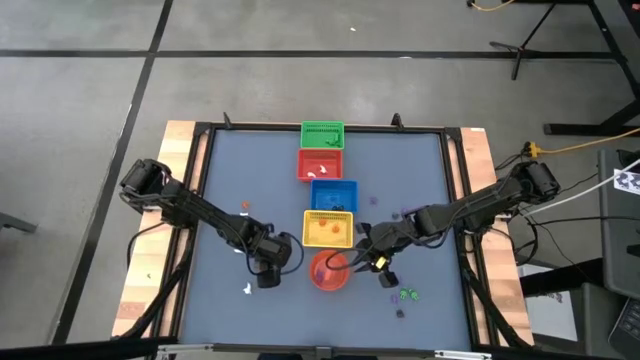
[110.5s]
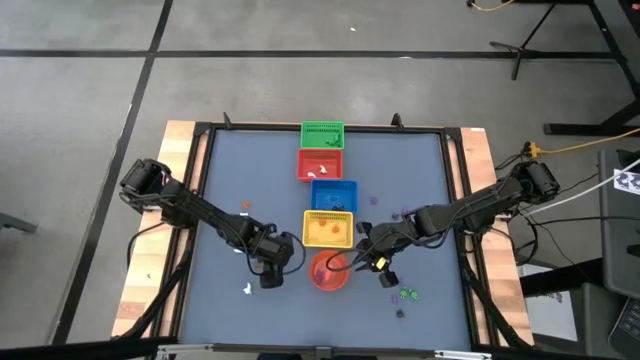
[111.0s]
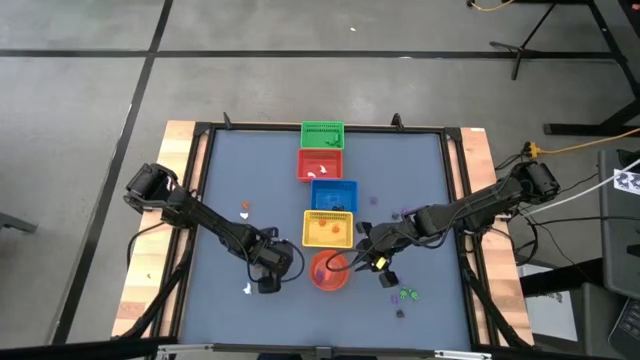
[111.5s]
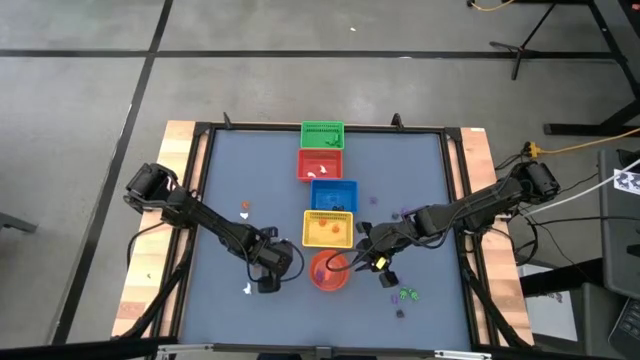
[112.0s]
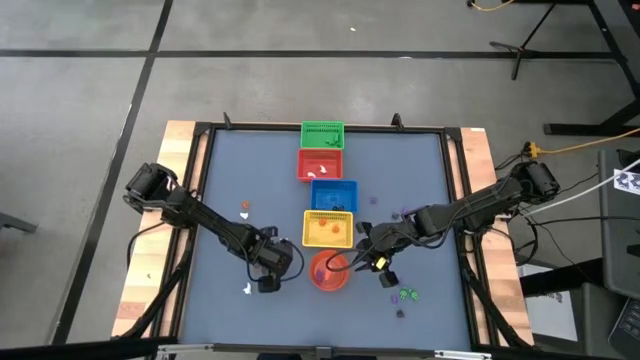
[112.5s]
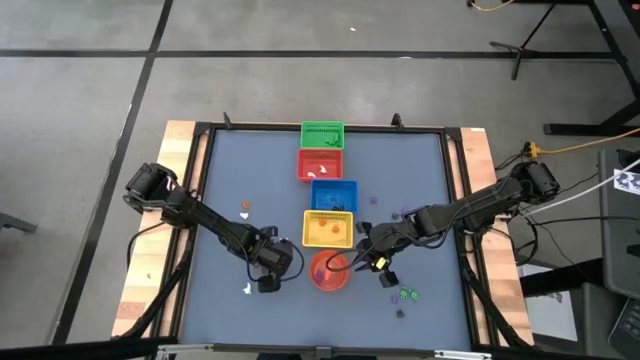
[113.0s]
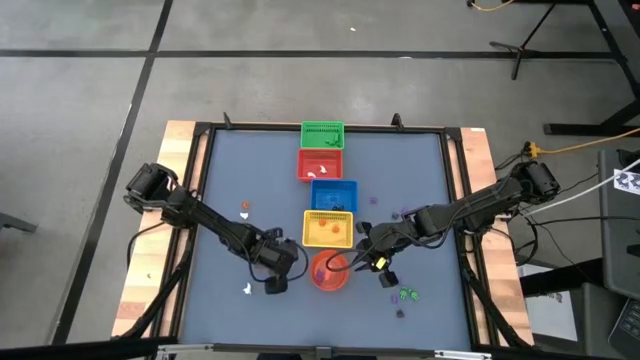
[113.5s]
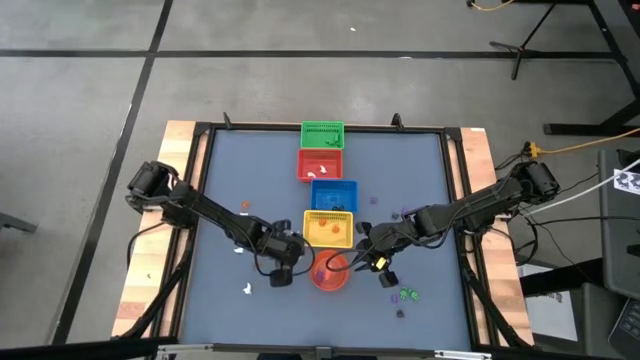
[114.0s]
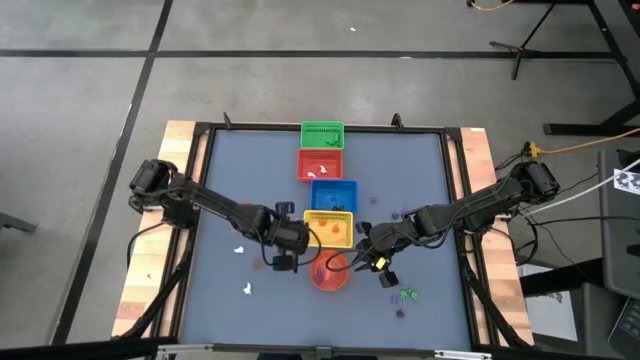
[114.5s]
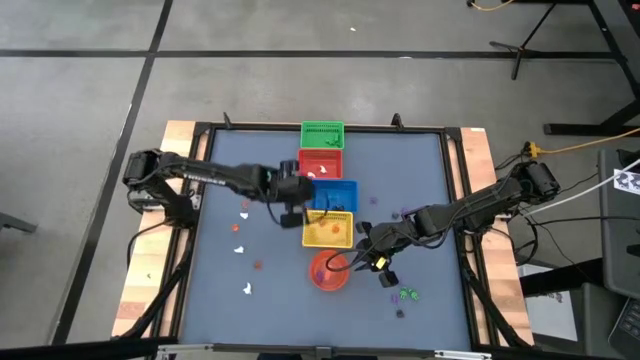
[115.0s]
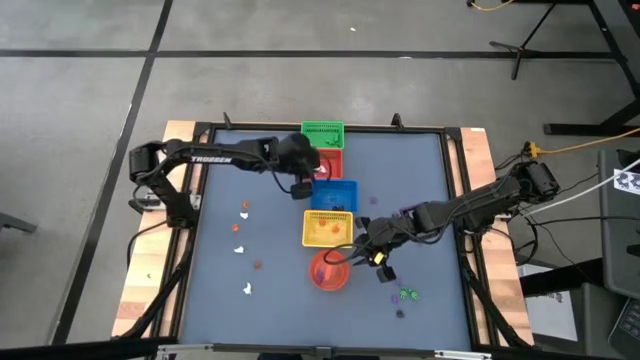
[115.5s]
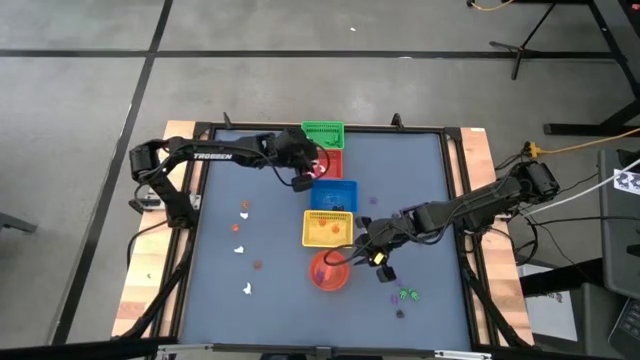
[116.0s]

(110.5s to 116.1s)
Task: Sort Halloween decoration
Put the white ghost toy into the red bin

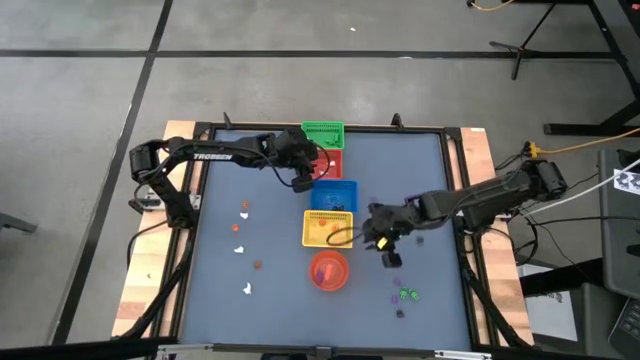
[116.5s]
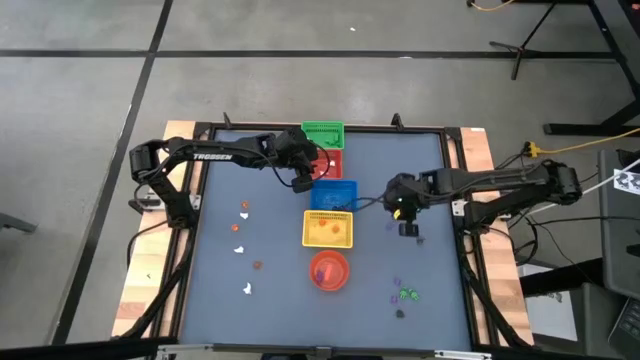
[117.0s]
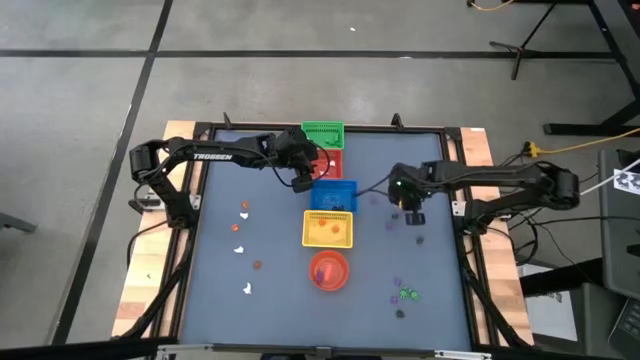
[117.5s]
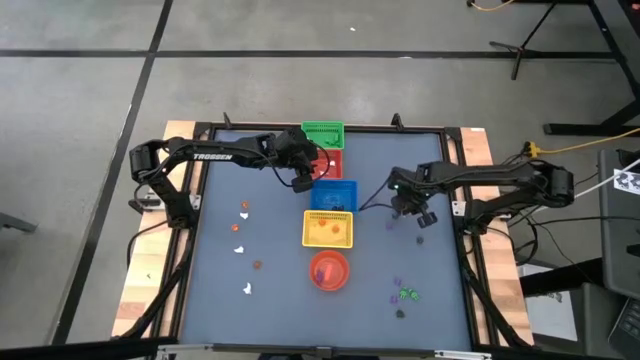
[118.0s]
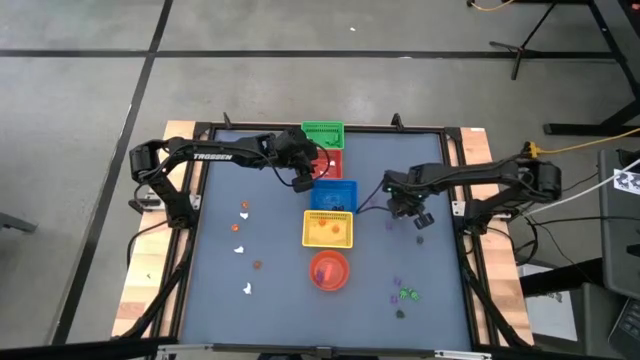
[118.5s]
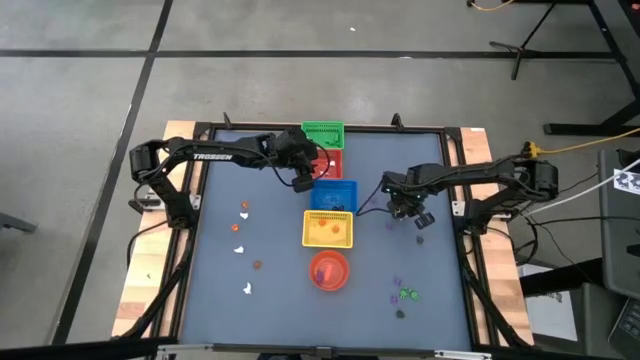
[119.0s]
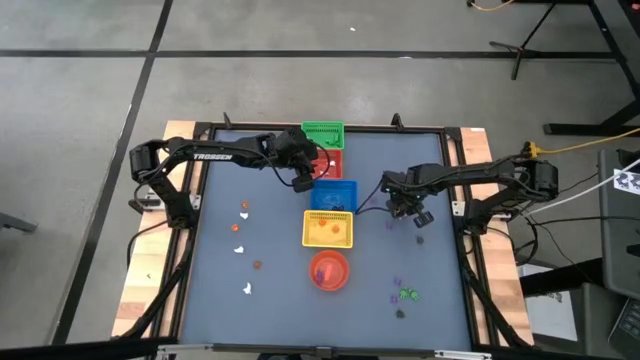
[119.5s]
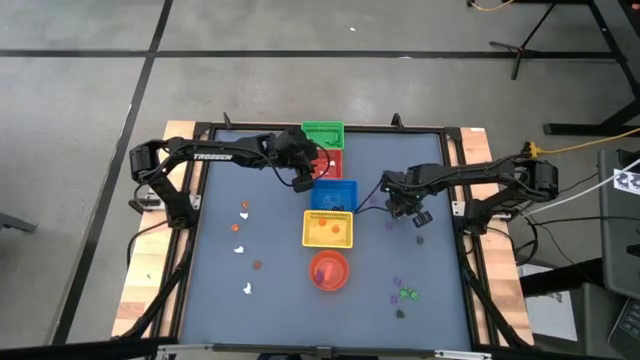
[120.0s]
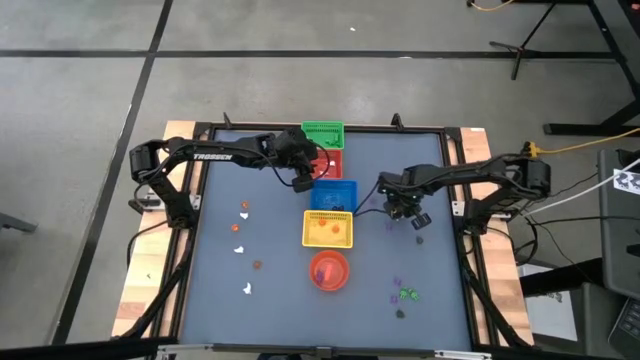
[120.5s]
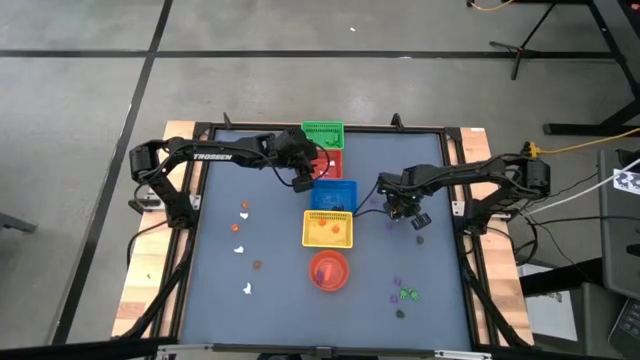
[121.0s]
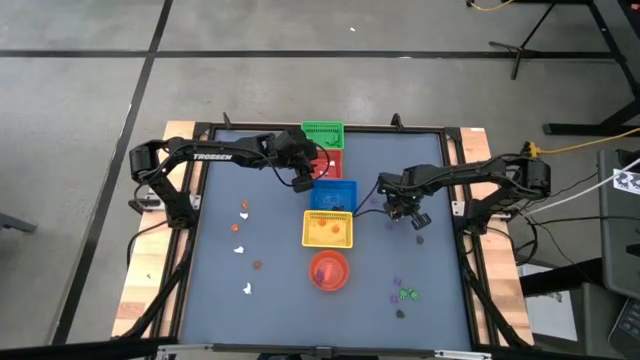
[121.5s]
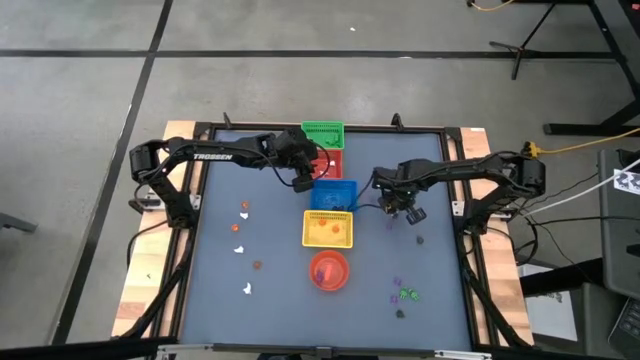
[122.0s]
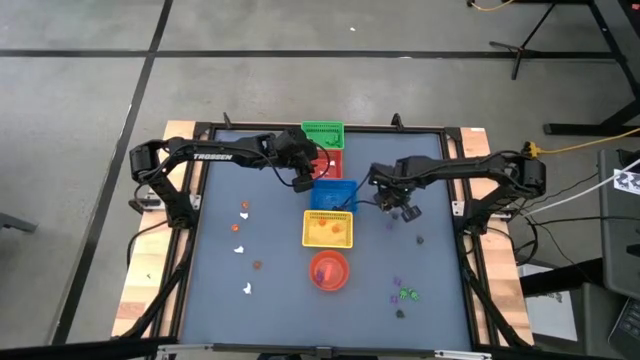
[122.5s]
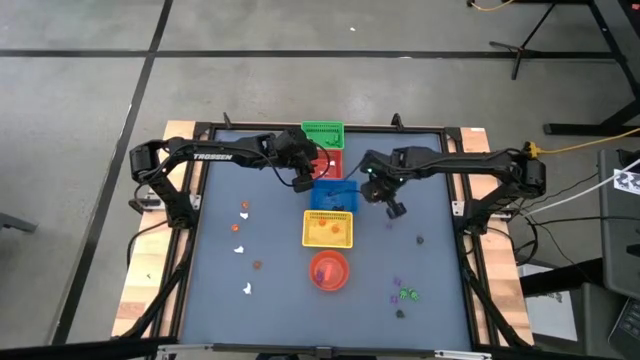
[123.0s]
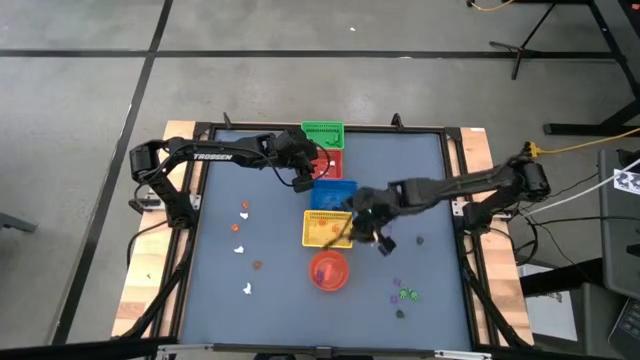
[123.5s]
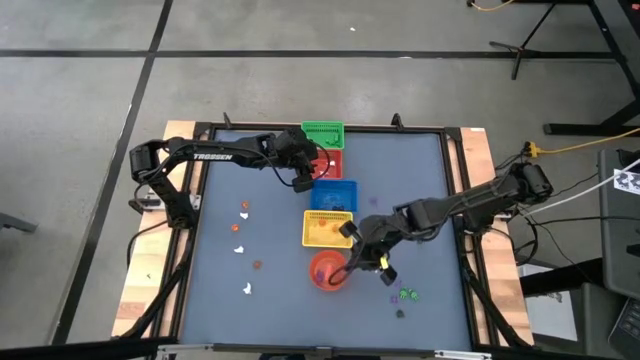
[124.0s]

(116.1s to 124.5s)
Put the purple spider toy into the orange bin

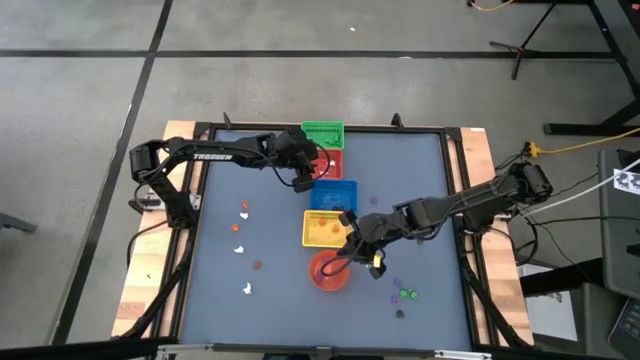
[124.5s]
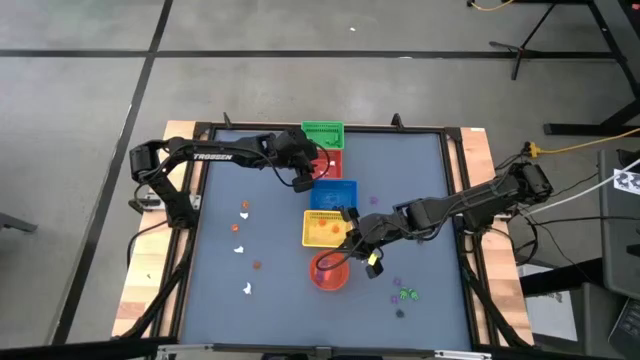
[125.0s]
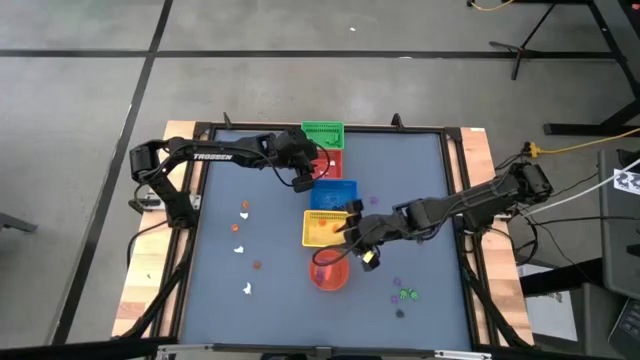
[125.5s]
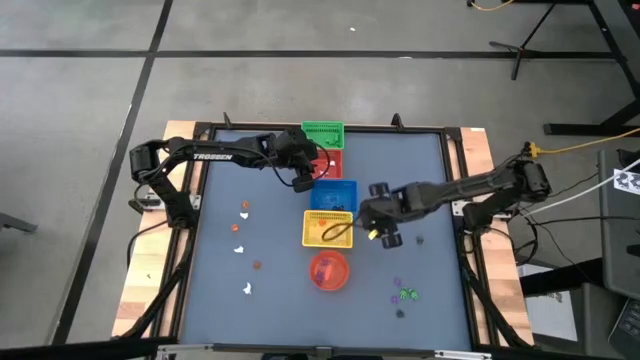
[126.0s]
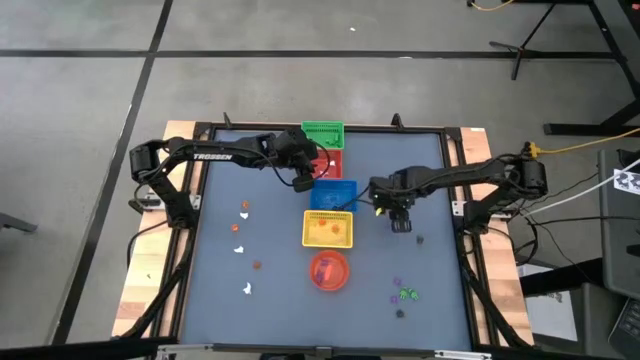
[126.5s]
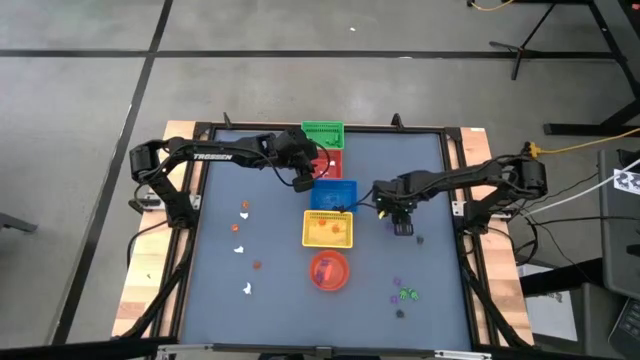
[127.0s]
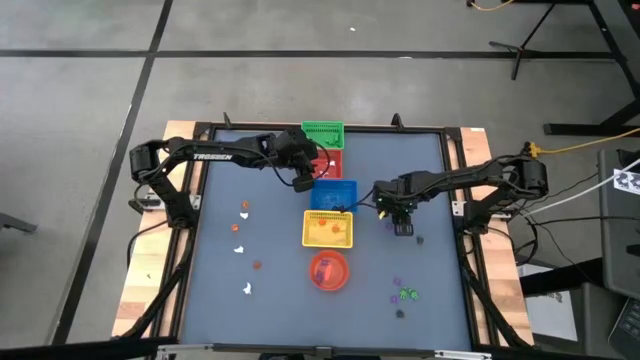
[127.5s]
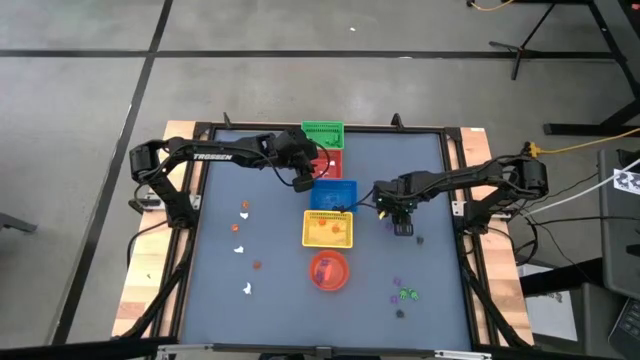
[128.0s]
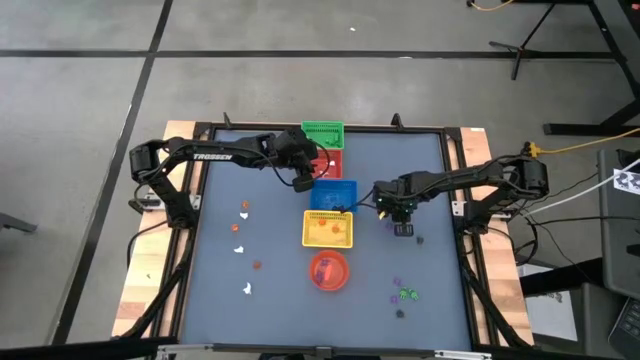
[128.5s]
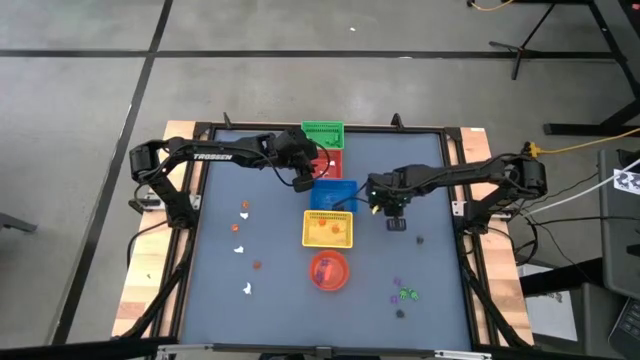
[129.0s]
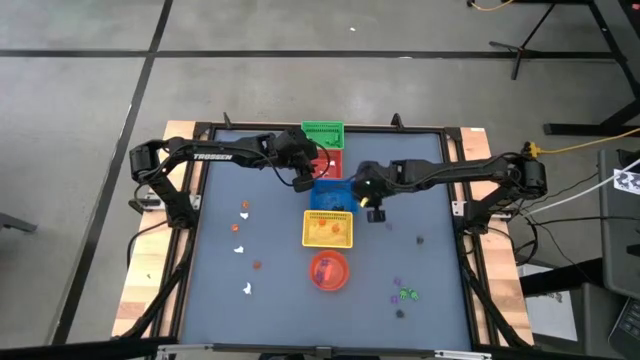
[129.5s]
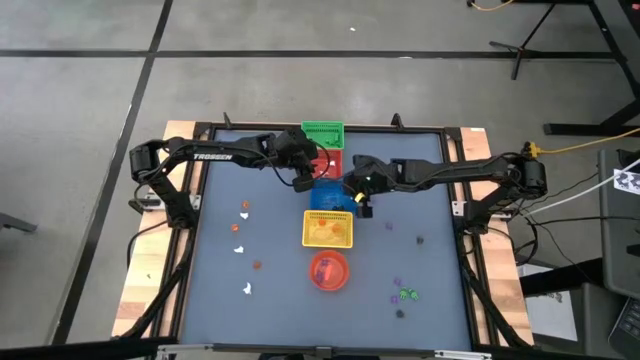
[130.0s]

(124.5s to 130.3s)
Put the black skull toy into the blue bin

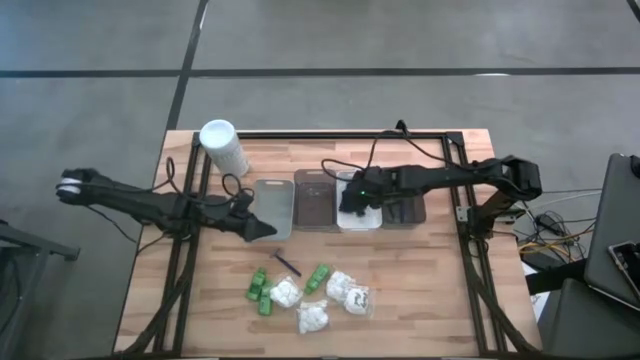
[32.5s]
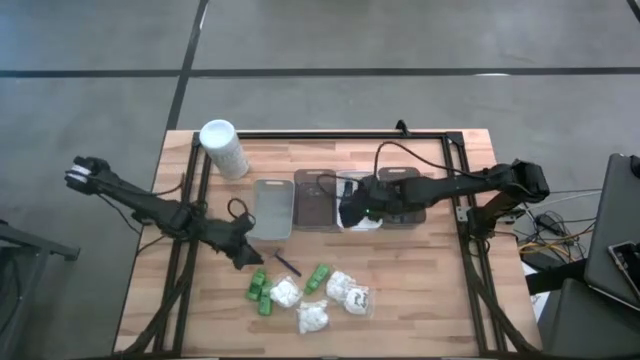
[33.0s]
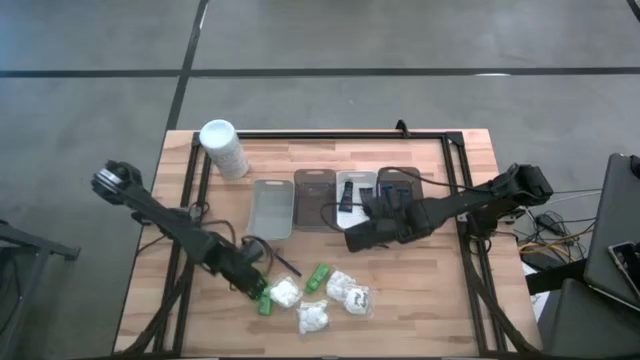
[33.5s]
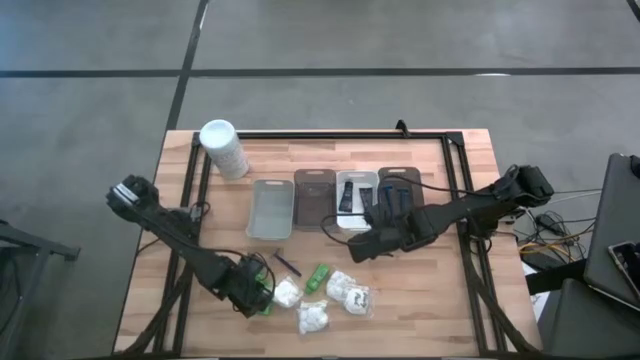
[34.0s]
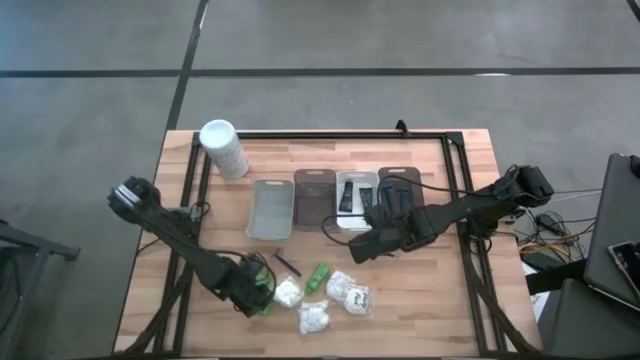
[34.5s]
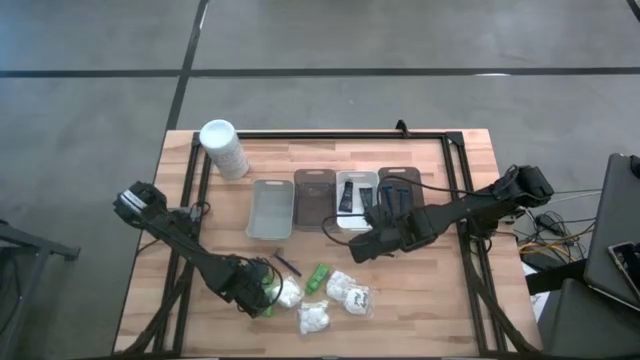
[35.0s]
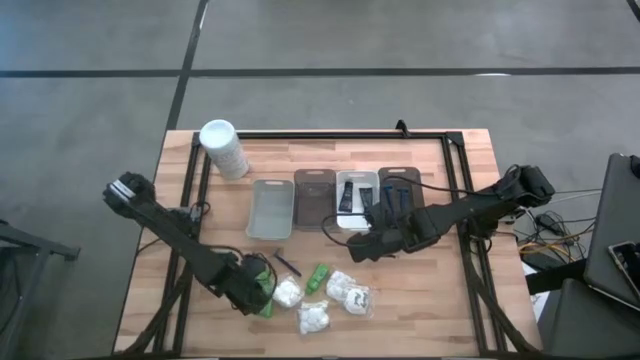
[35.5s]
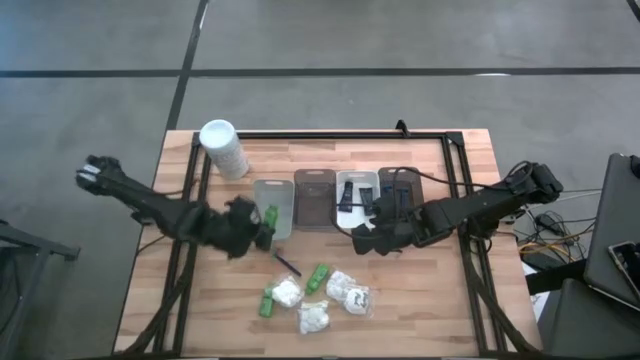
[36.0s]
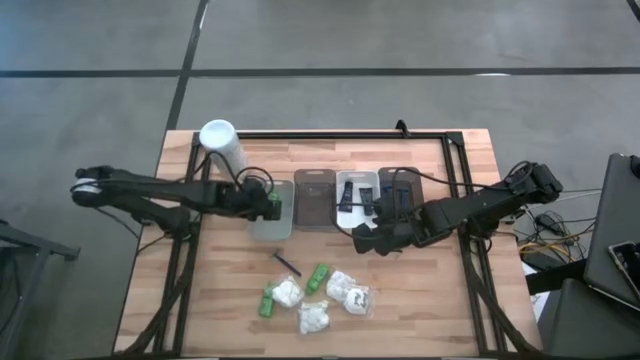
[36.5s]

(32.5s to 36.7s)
Task: Pick & Place Travel size toiletries
Put the top left green shampoo into the gray bin
